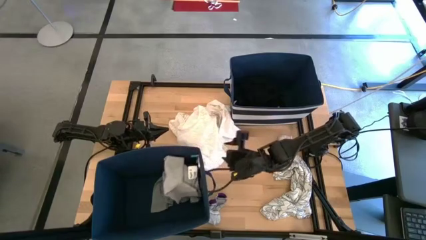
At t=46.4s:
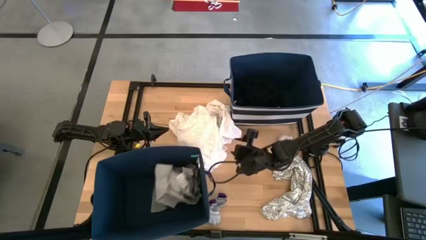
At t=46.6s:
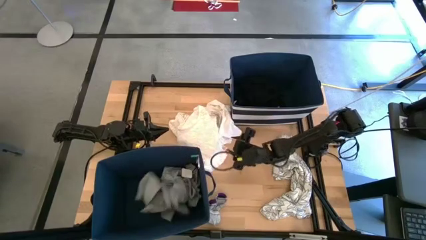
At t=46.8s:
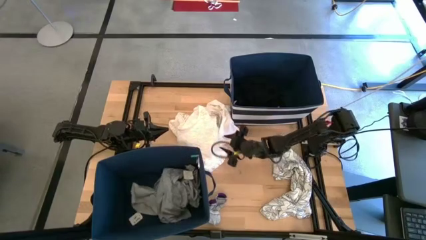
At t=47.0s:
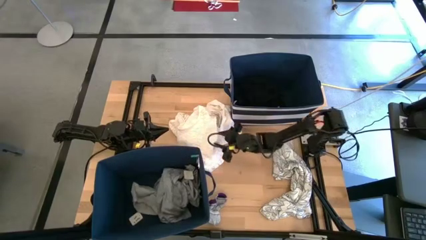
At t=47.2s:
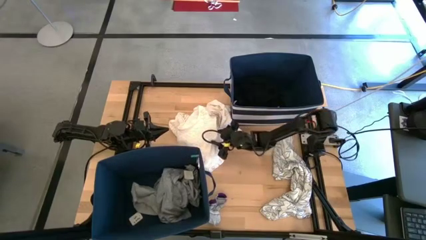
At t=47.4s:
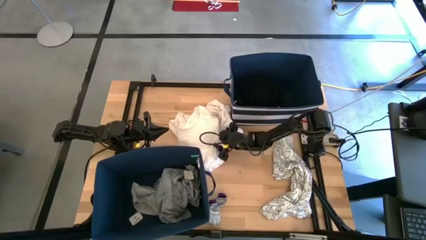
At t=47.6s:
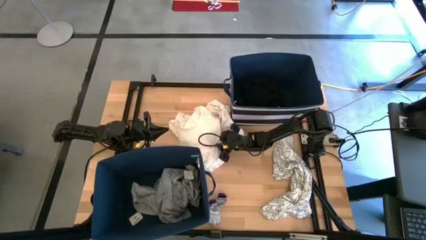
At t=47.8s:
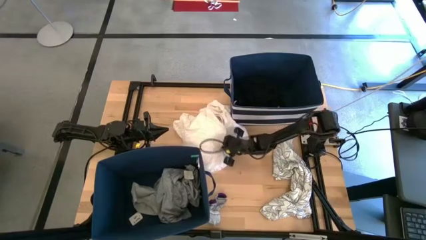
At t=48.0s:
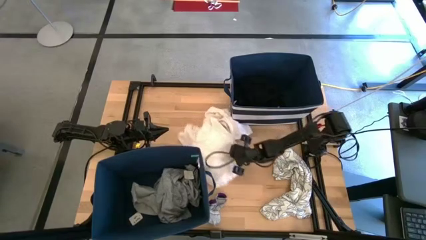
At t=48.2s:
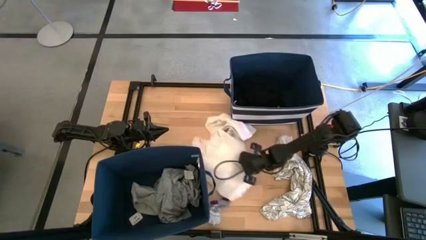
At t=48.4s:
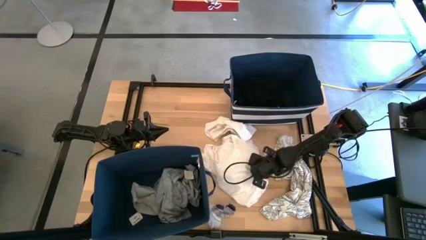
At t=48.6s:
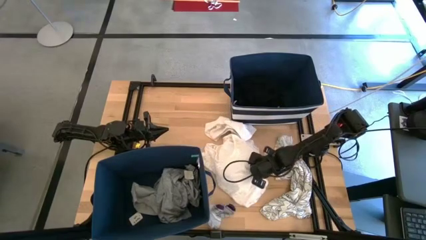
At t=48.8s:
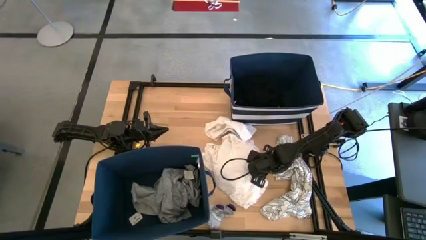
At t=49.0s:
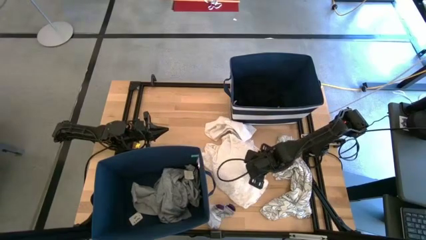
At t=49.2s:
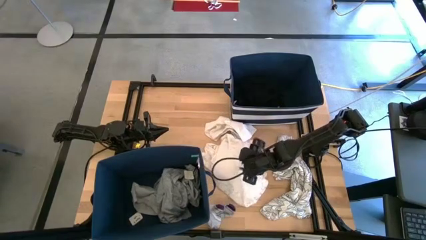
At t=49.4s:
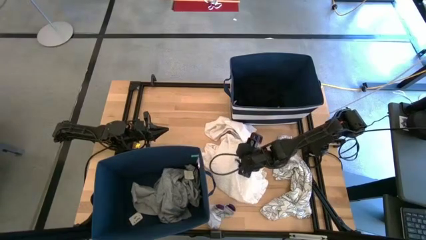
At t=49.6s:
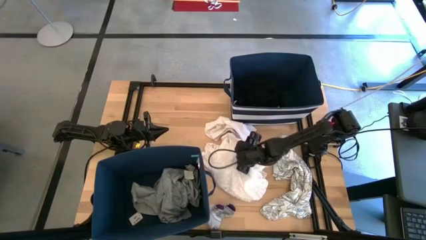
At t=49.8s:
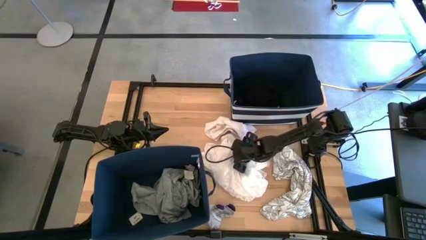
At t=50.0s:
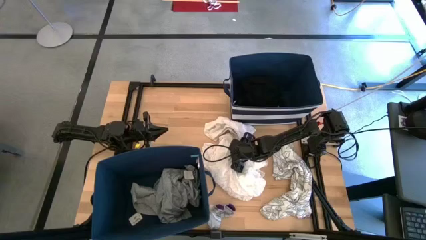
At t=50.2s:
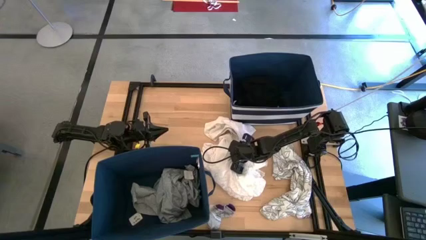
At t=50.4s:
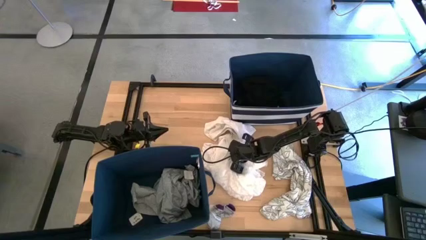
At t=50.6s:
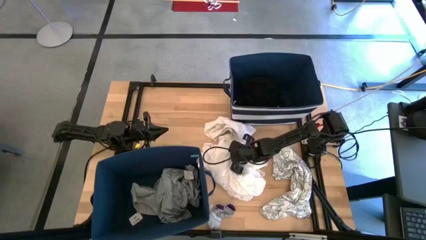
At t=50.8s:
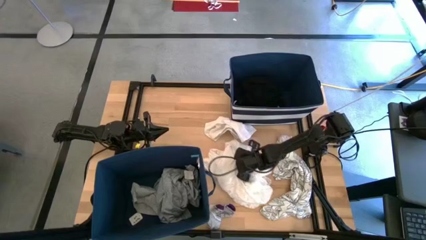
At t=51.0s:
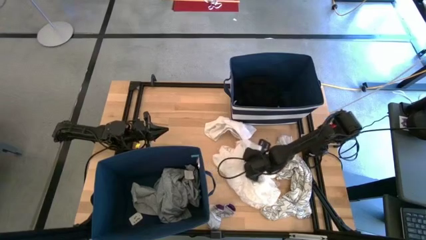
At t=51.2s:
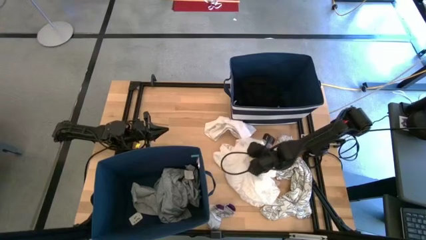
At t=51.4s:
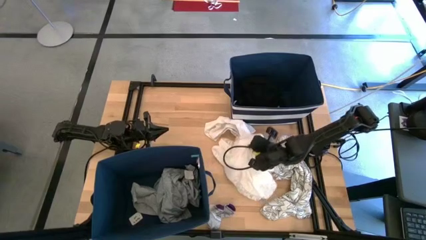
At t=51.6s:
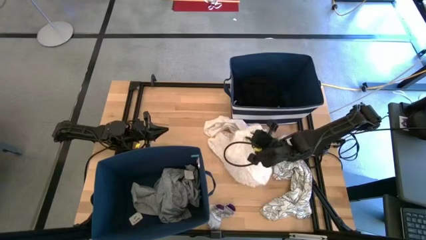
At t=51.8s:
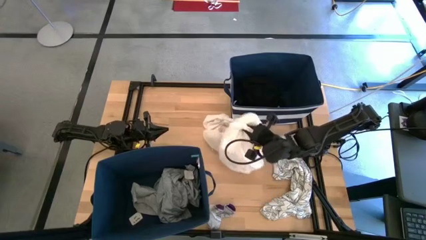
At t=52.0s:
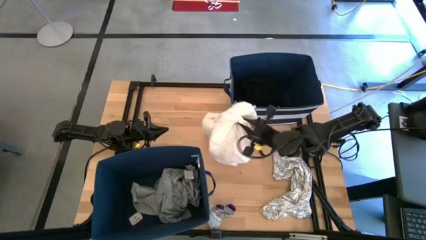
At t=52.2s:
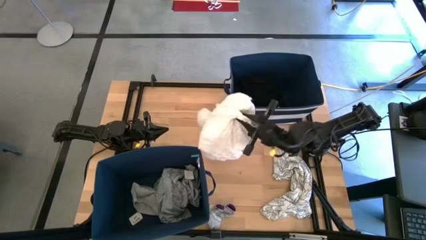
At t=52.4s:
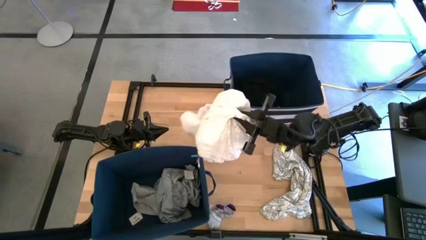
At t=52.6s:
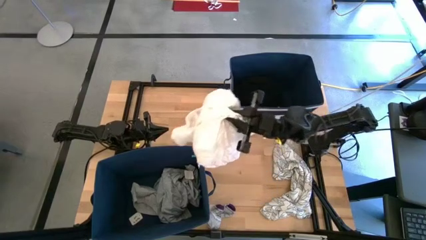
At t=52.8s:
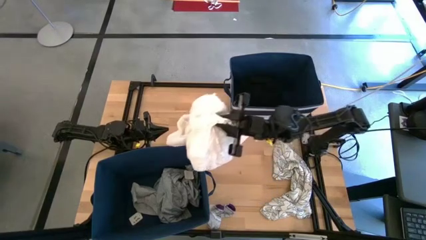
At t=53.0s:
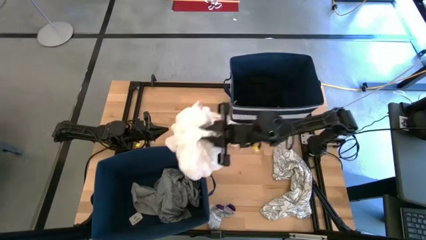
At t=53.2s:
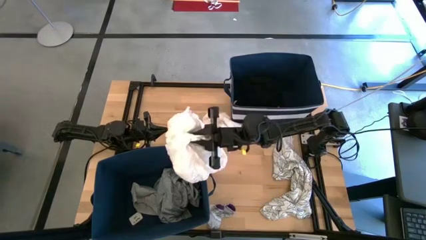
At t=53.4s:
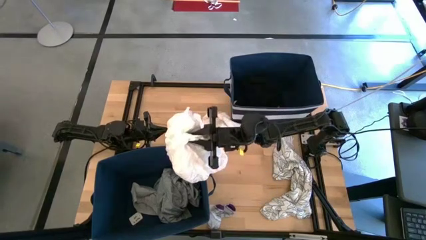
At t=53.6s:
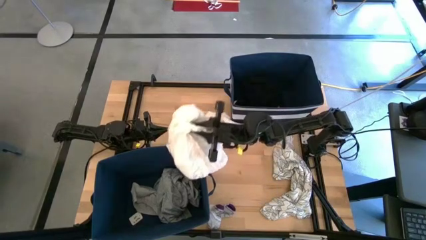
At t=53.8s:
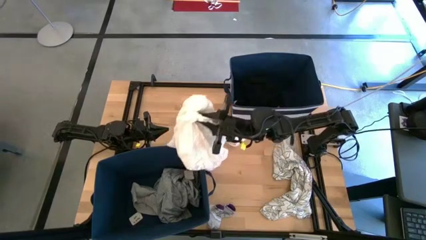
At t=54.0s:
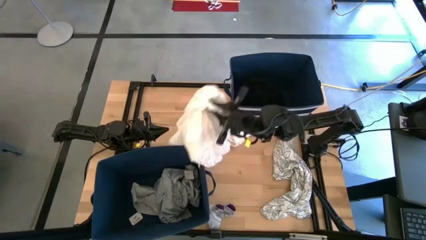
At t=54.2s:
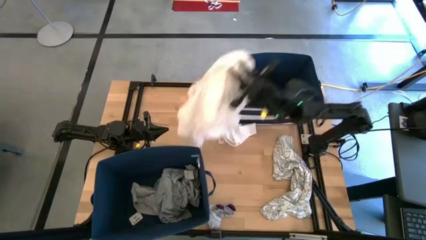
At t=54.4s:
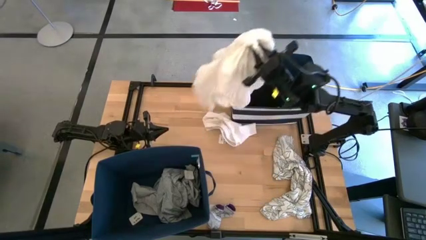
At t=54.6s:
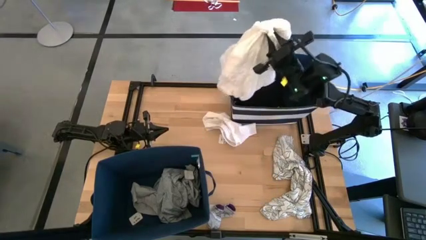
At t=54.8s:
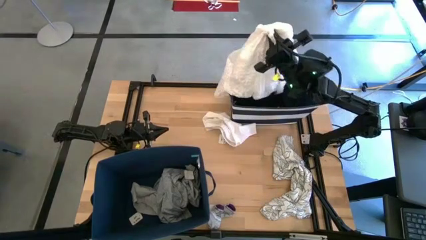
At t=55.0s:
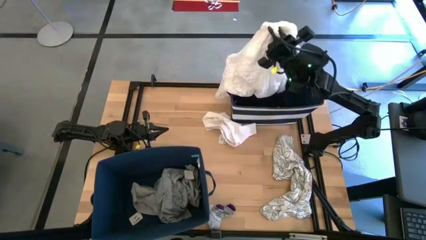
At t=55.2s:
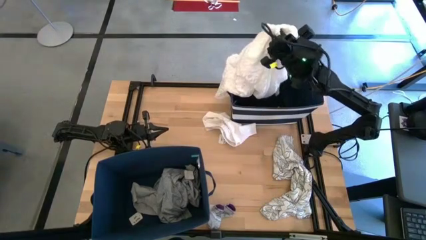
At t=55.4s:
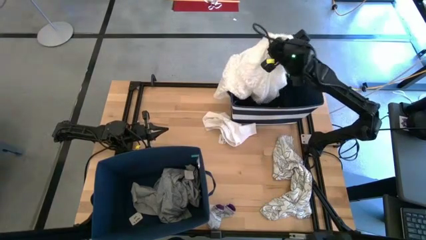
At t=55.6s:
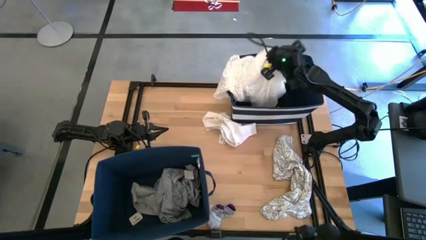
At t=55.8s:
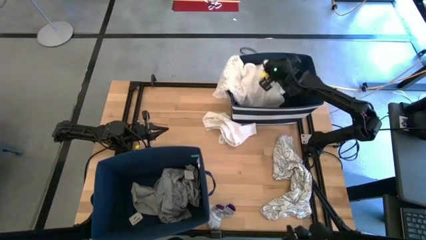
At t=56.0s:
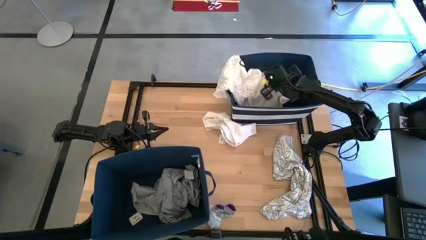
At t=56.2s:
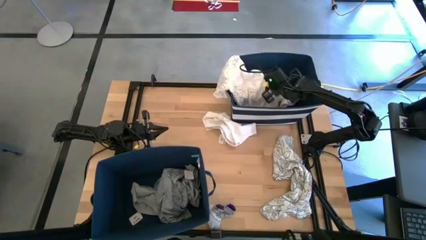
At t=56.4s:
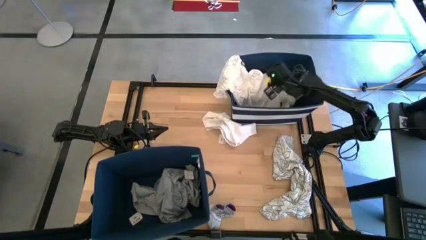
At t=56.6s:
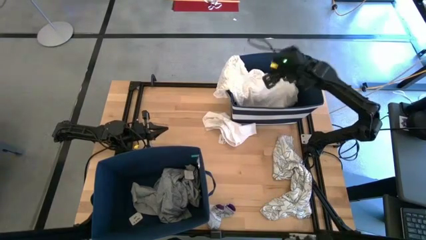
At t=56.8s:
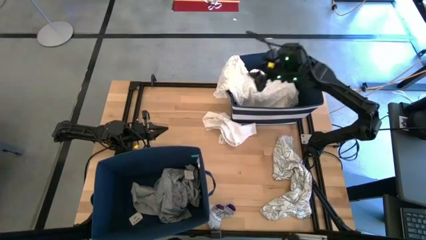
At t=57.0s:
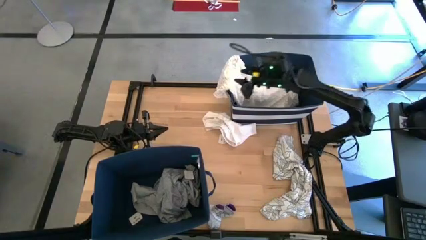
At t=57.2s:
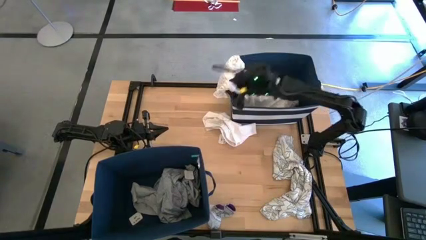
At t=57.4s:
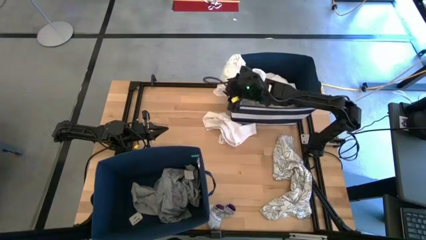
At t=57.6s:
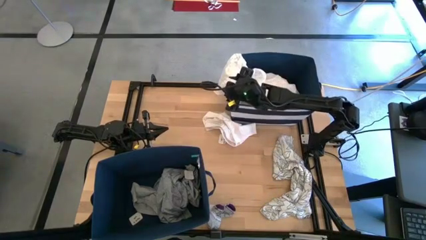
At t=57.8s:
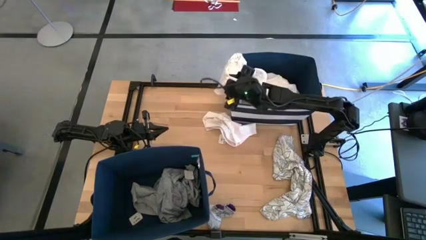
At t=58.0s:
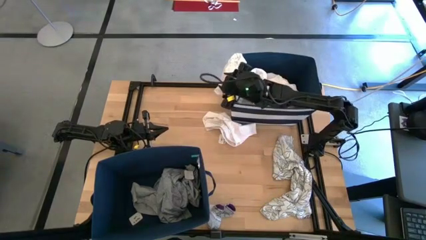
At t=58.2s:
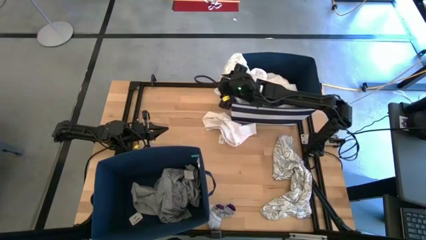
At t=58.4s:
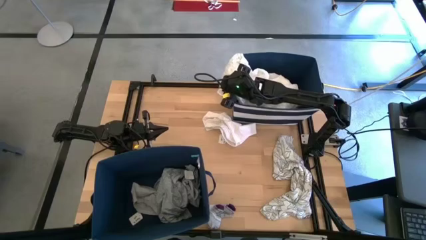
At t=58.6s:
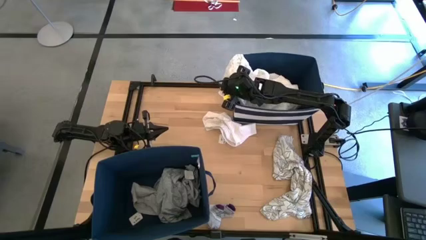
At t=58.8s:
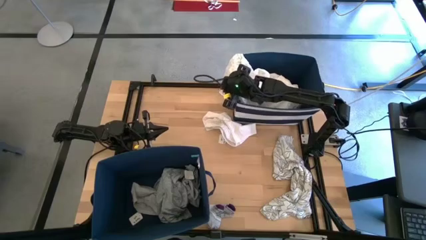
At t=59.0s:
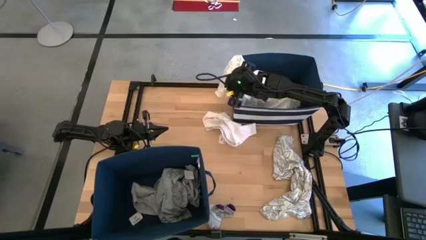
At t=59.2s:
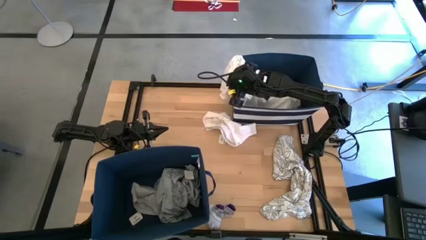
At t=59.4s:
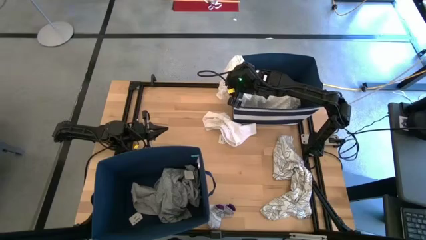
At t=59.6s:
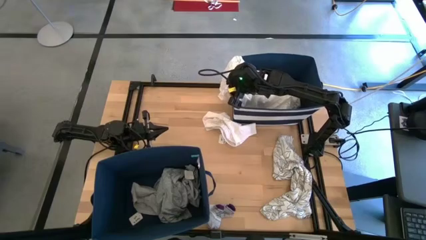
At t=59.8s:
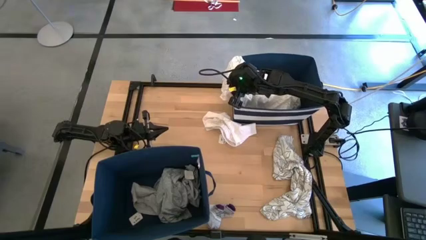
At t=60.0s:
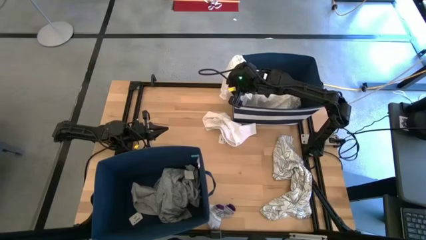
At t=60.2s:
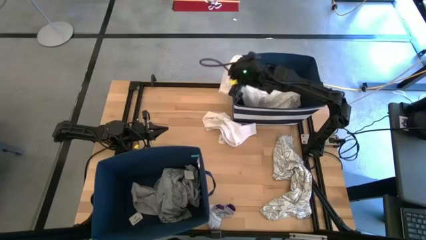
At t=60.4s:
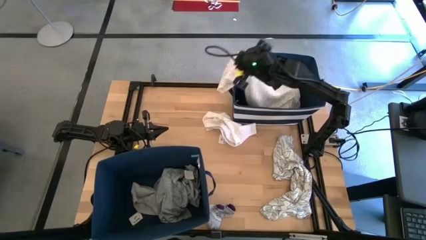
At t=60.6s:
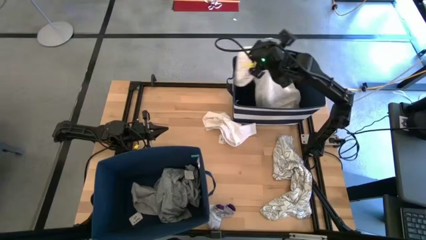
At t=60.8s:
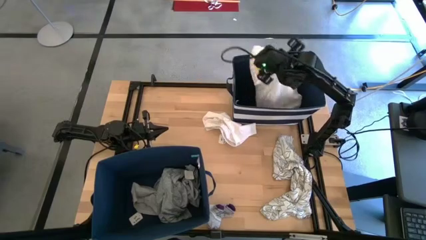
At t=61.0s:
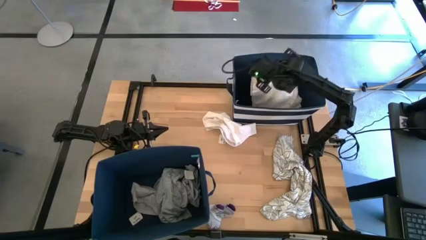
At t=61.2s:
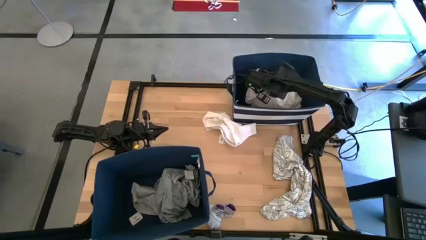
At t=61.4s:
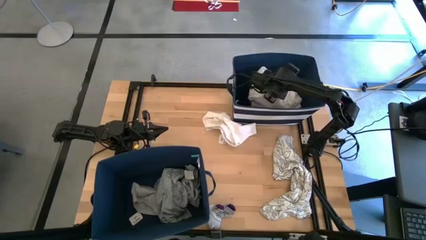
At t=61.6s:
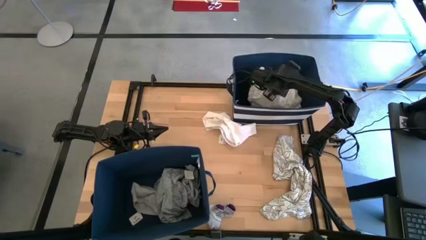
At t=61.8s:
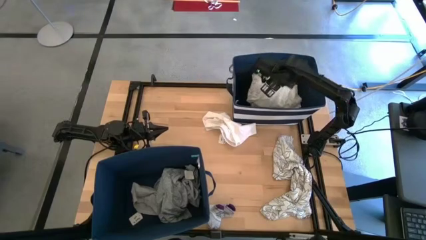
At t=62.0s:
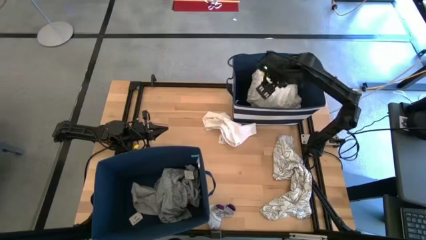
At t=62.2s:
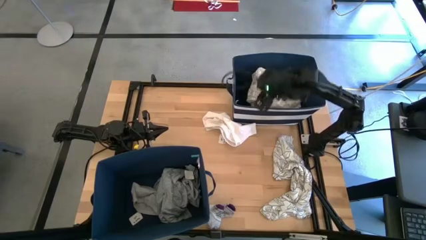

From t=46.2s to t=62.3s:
Task: Sort clothes
Put the white clothes into the top right laundry bin
